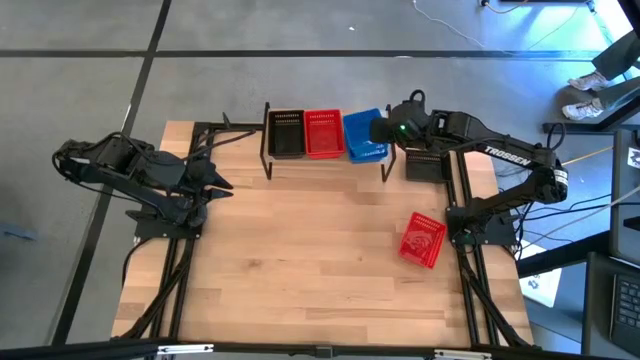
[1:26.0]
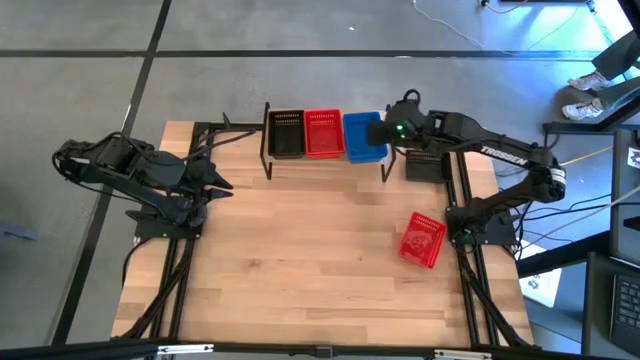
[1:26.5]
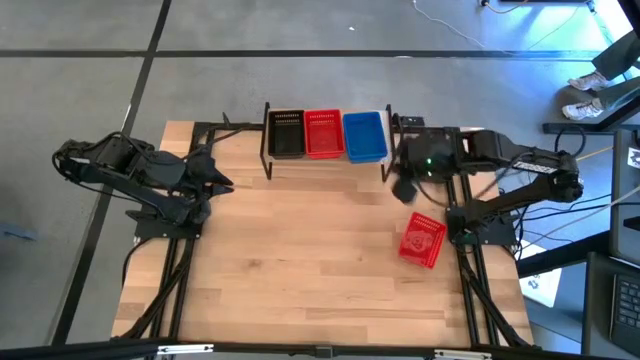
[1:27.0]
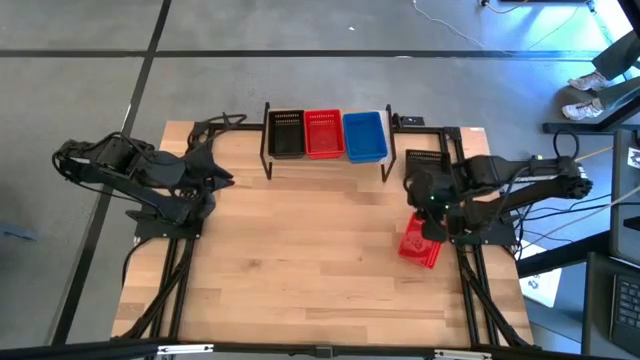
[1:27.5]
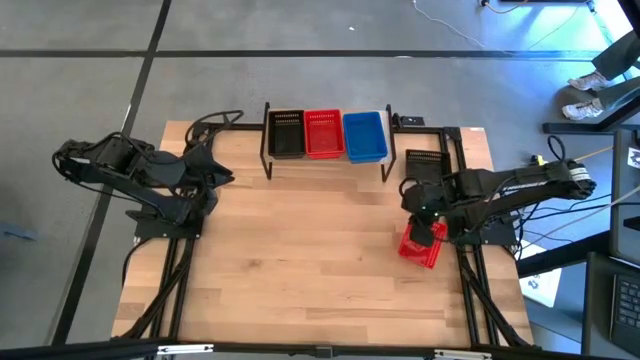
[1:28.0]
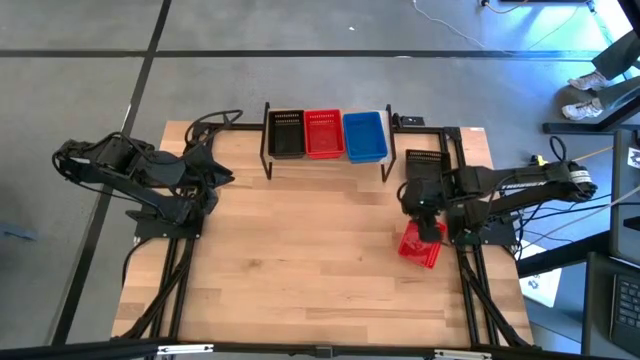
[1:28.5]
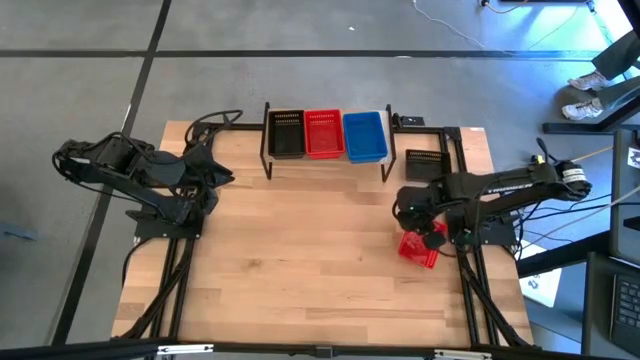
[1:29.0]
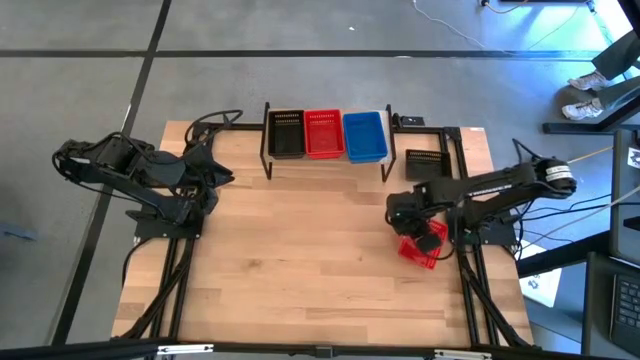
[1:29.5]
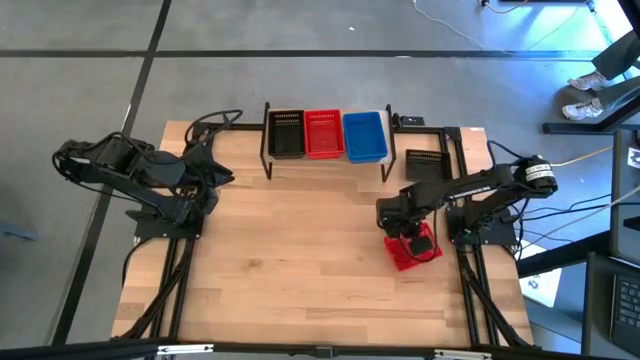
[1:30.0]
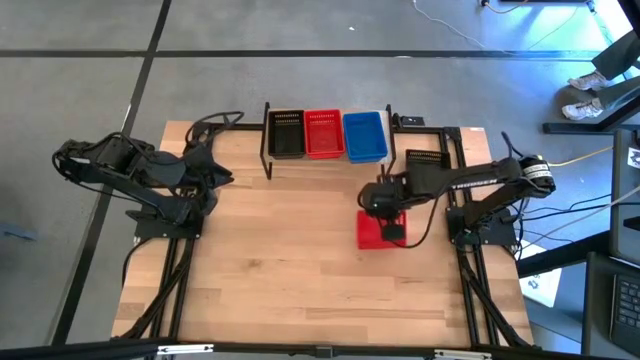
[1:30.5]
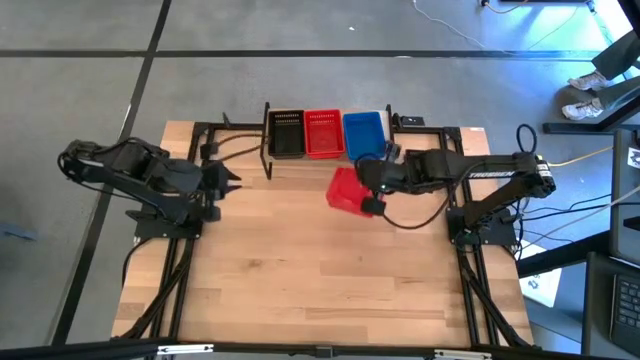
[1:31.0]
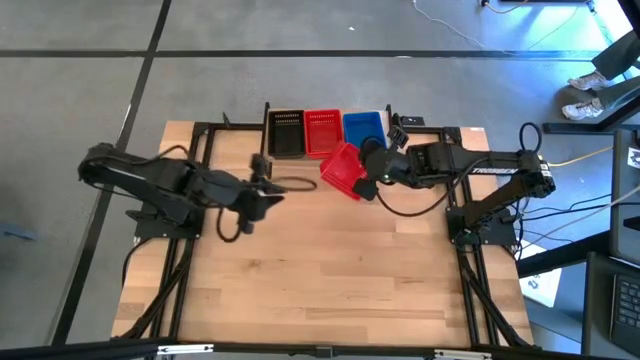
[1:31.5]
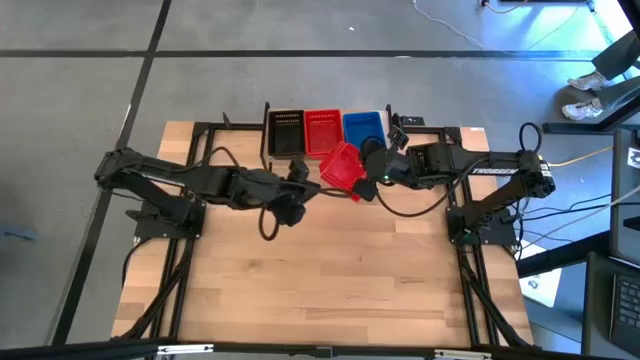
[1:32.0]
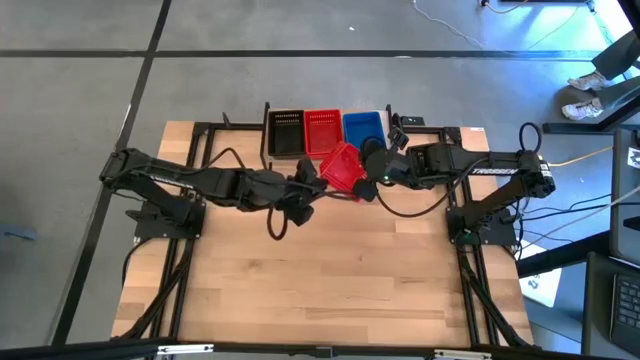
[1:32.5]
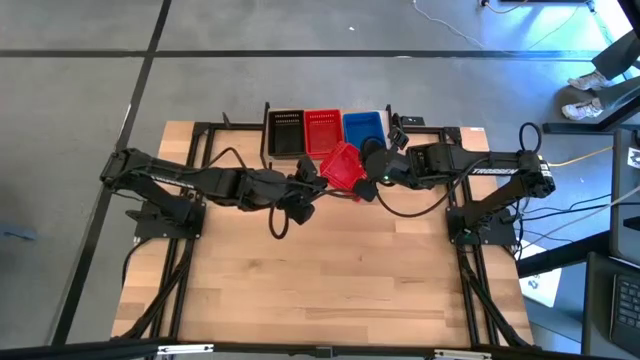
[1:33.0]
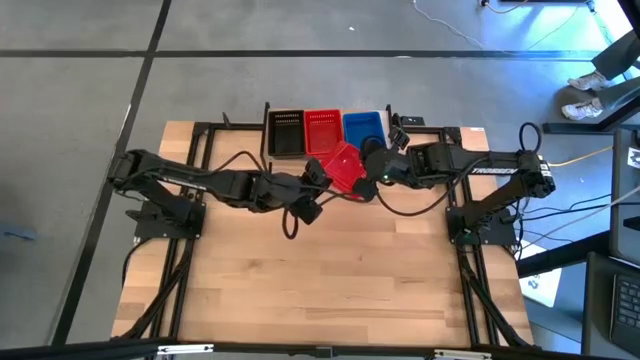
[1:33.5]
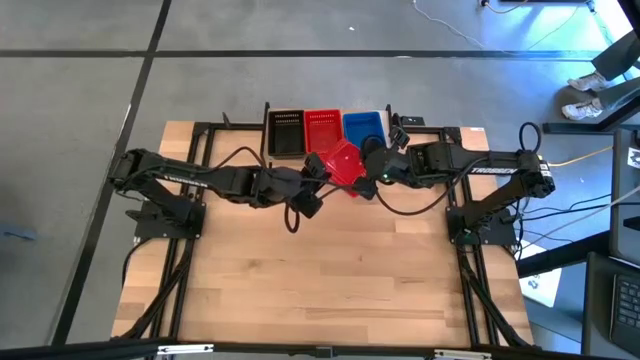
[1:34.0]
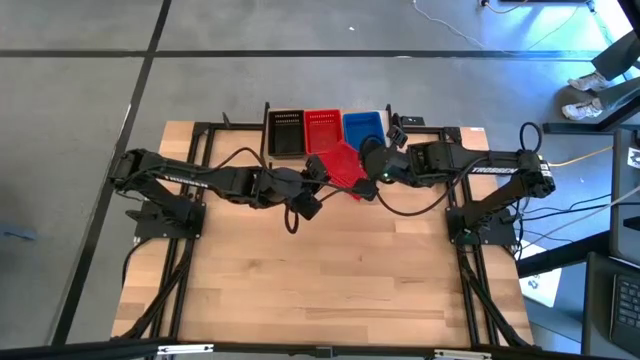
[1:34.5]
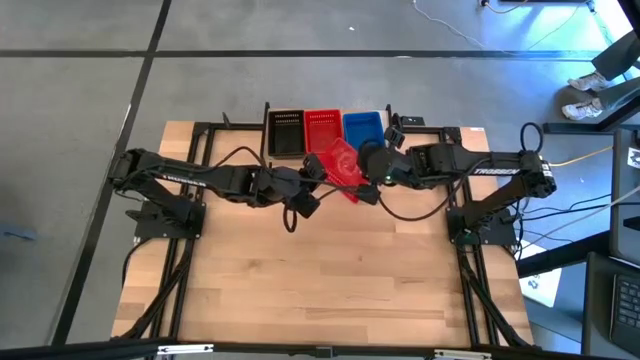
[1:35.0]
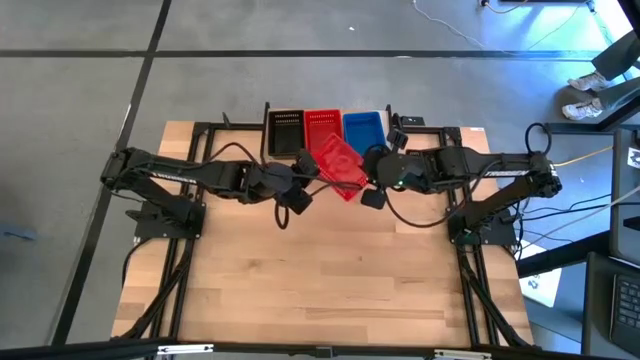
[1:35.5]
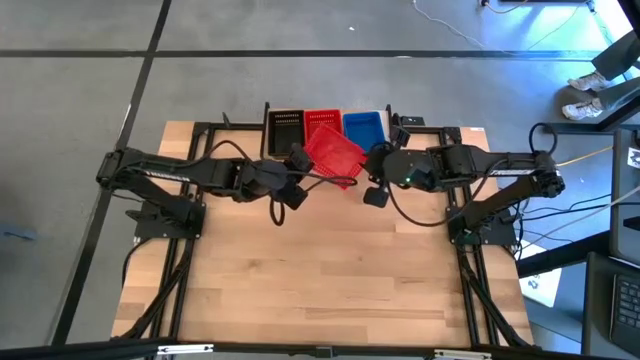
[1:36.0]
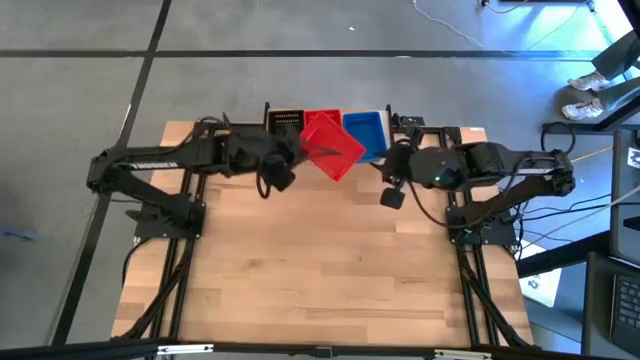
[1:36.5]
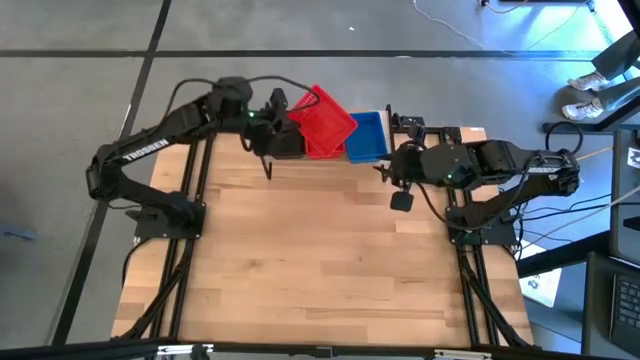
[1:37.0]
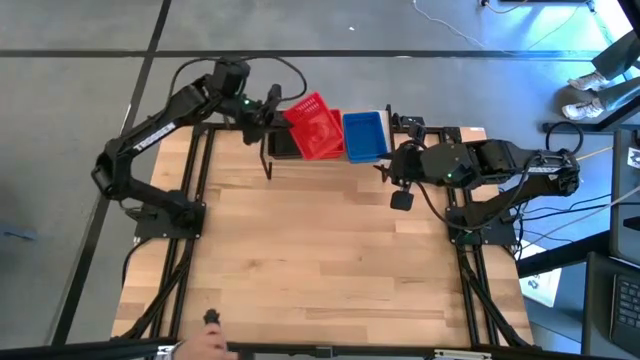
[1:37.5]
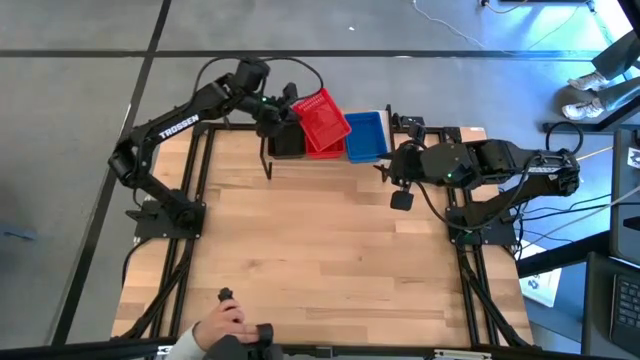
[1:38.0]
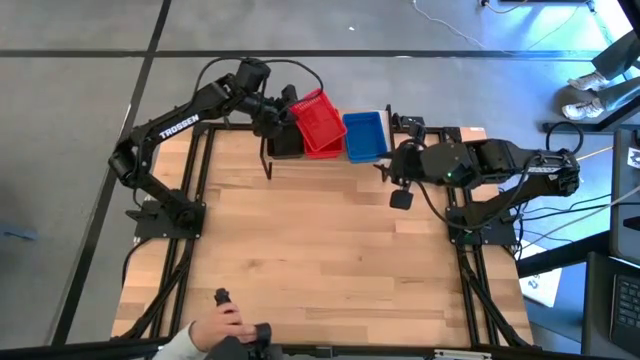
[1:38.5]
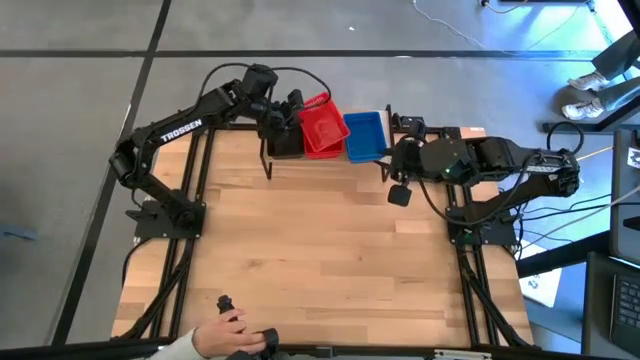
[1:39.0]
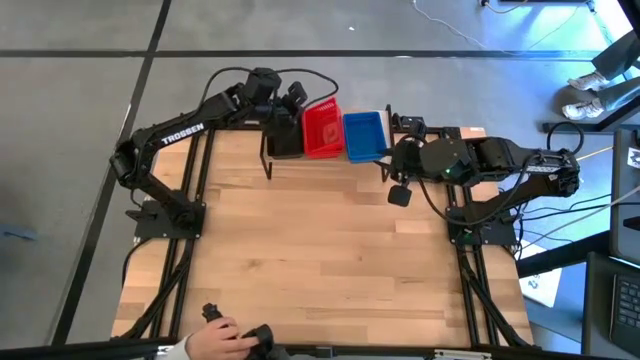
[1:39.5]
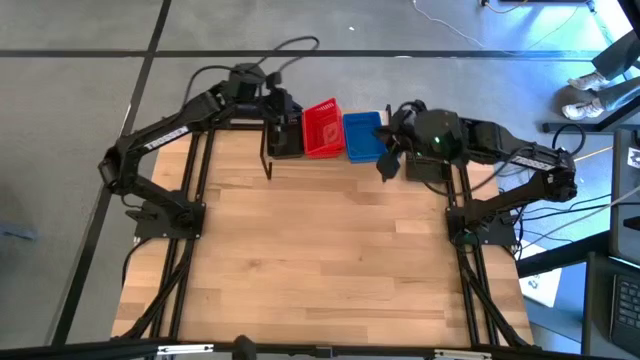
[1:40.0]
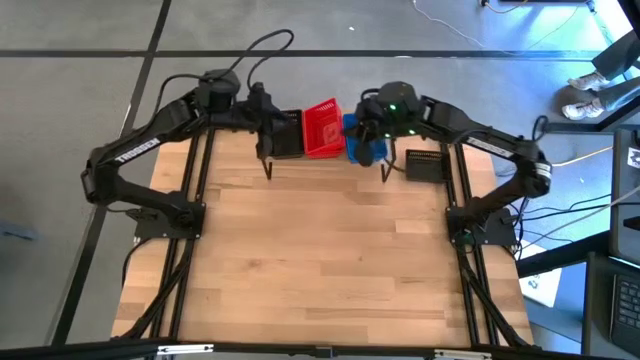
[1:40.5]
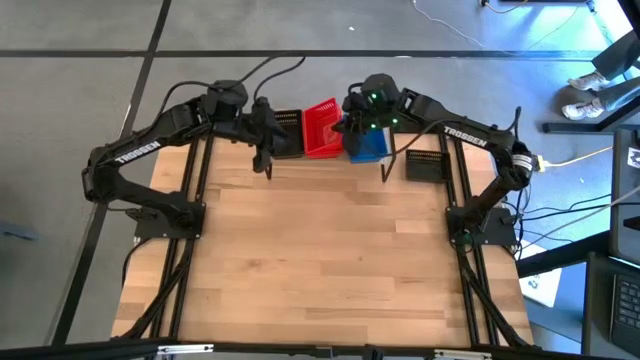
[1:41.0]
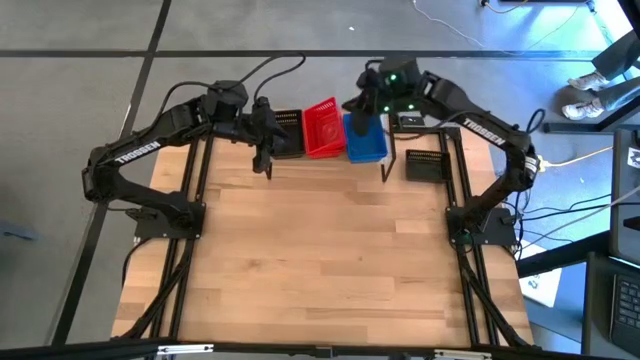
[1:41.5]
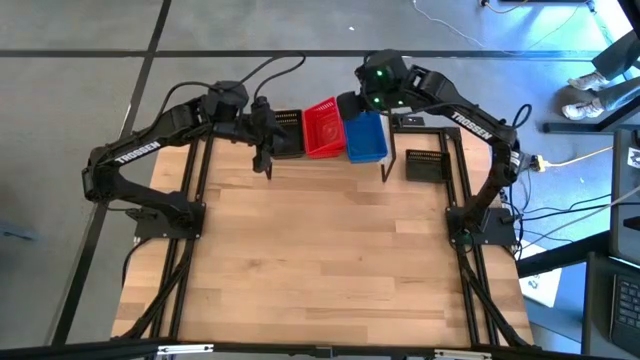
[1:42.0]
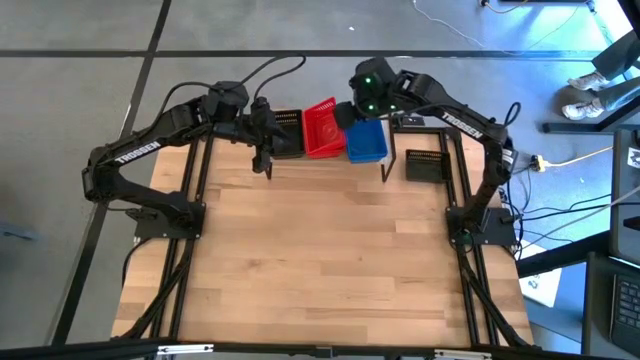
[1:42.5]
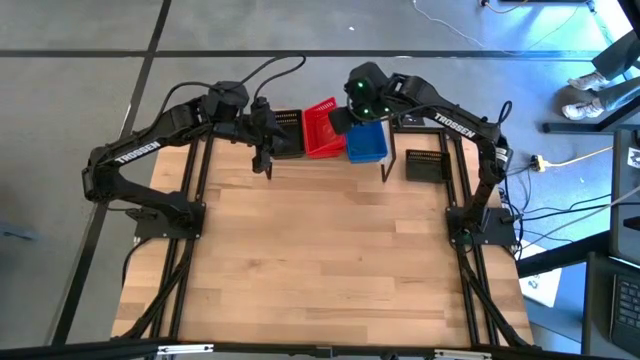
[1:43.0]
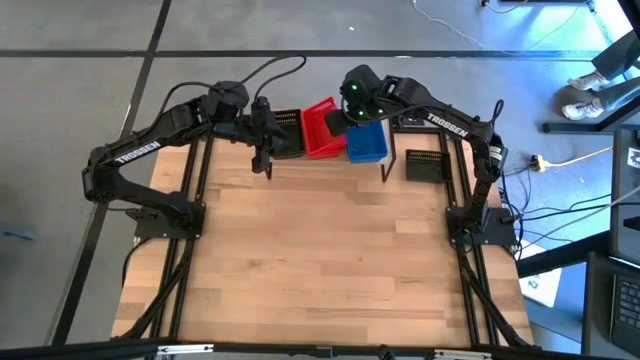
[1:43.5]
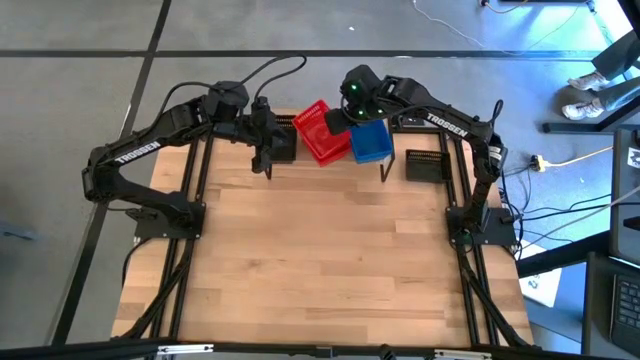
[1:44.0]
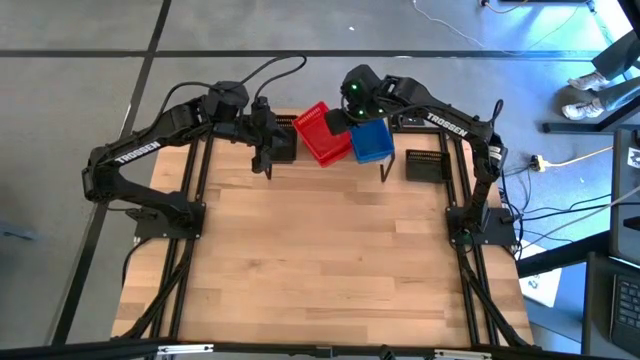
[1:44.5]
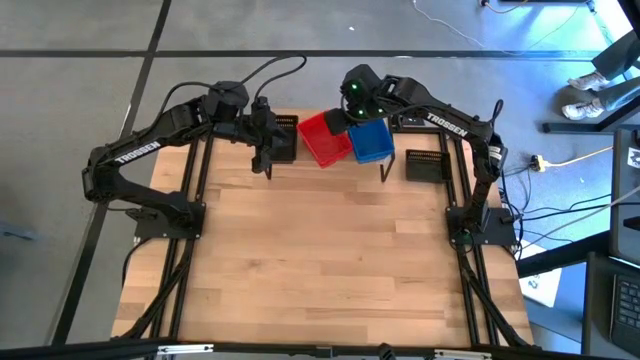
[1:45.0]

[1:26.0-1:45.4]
Task: Stack baskets on shelf by color
Stack the red bin on the red bin on the shelf

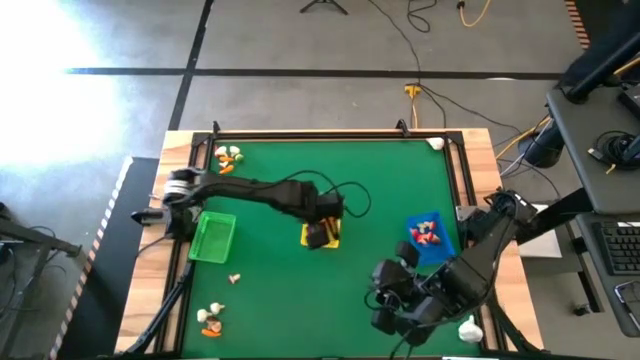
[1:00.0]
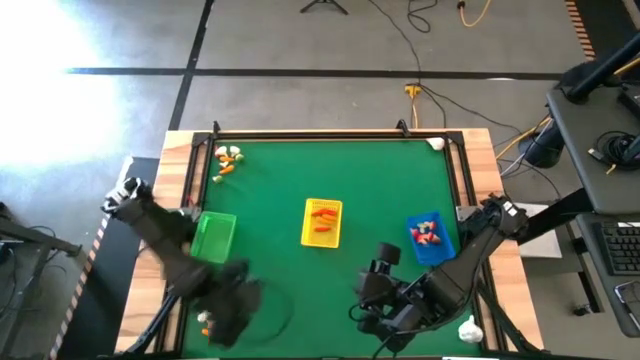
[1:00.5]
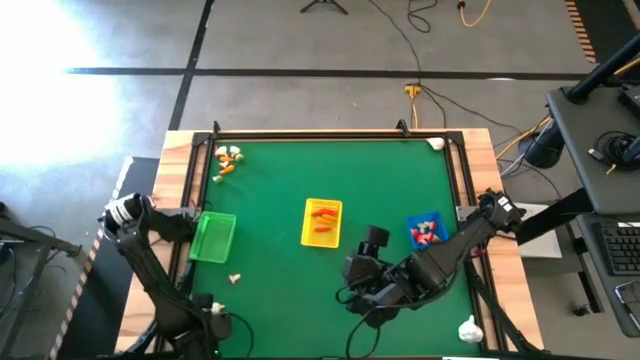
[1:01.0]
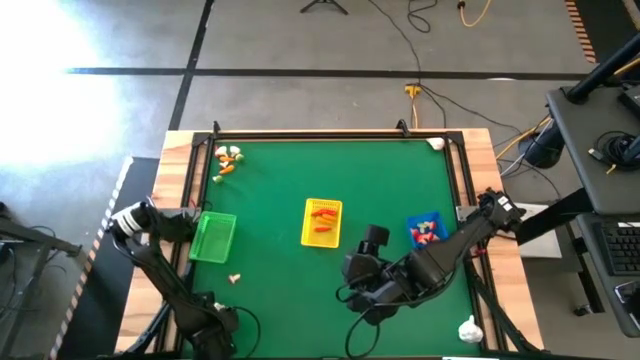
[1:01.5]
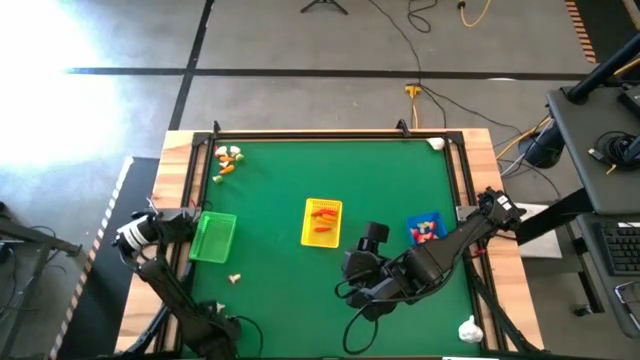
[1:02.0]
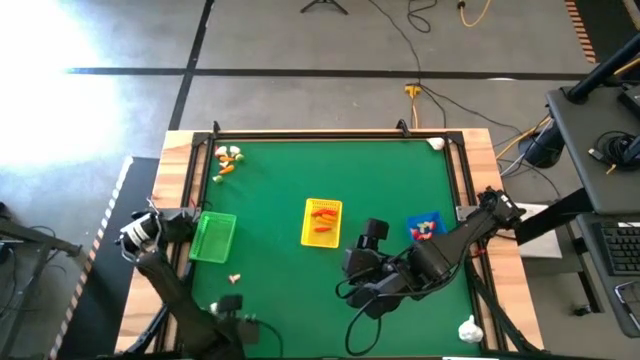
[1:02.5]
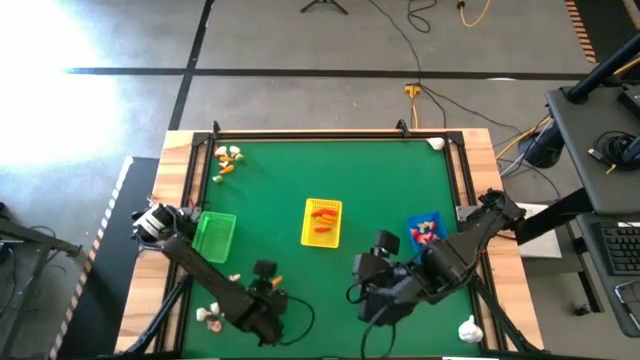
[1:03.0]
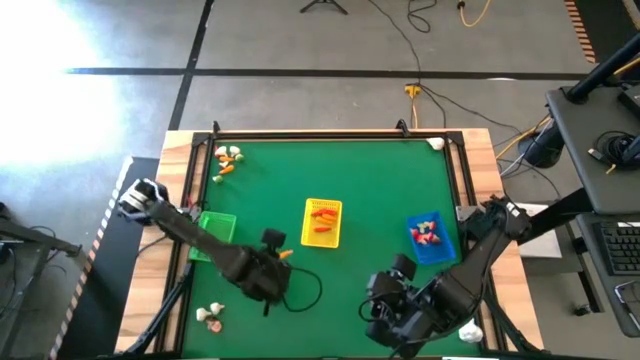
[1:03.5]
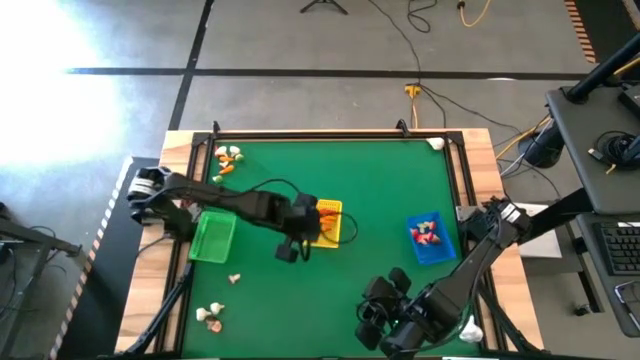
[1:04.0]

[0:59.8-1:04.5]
Task: Sort produce into baskets
Put the yellow chili pepper into the yellow bin
